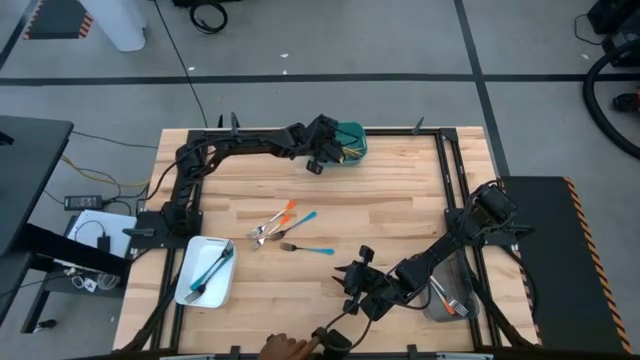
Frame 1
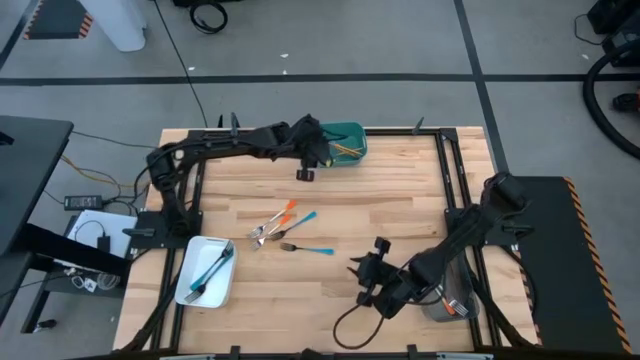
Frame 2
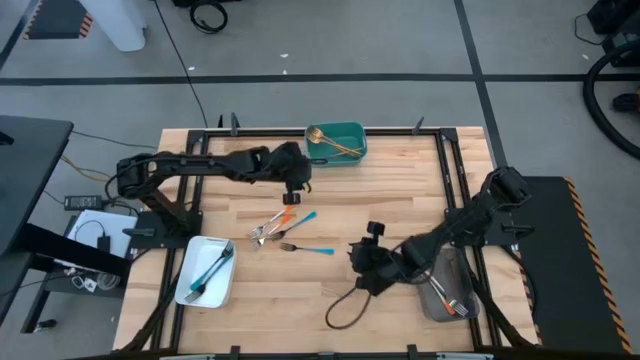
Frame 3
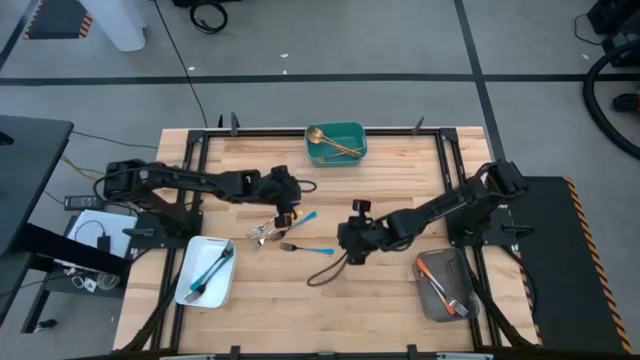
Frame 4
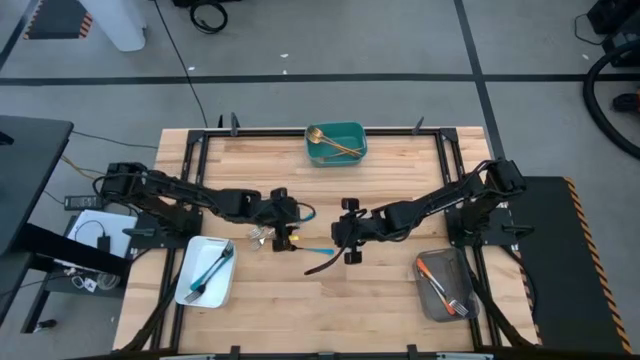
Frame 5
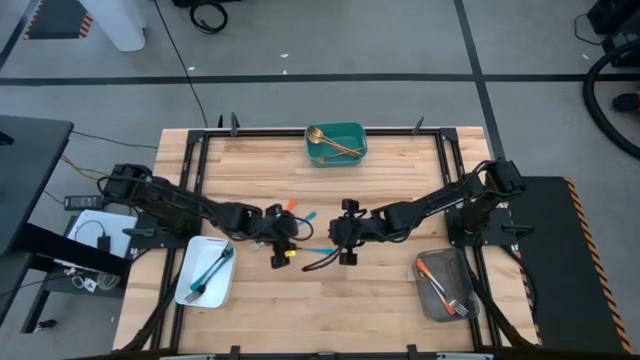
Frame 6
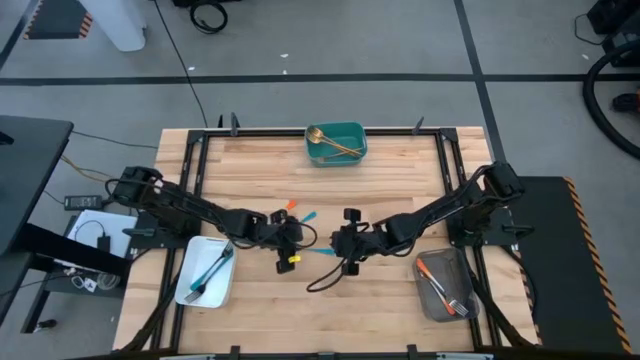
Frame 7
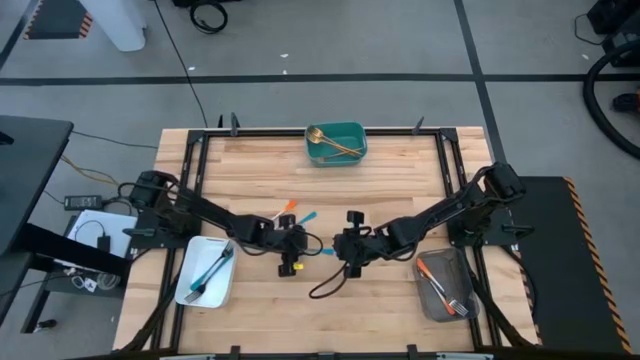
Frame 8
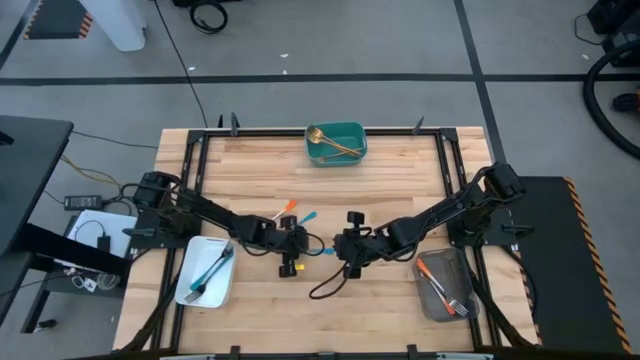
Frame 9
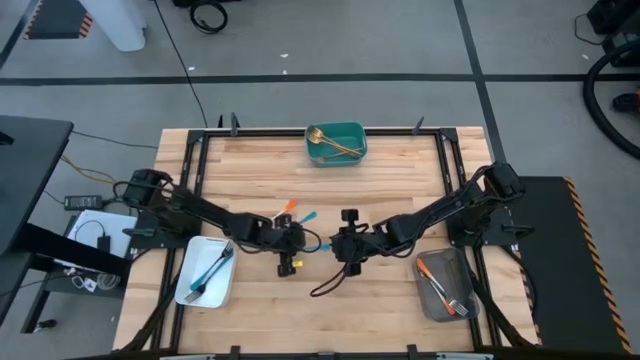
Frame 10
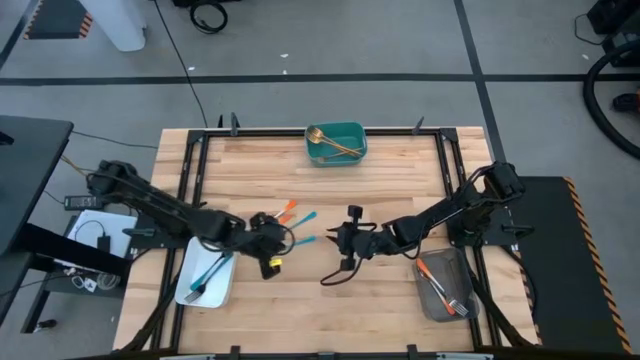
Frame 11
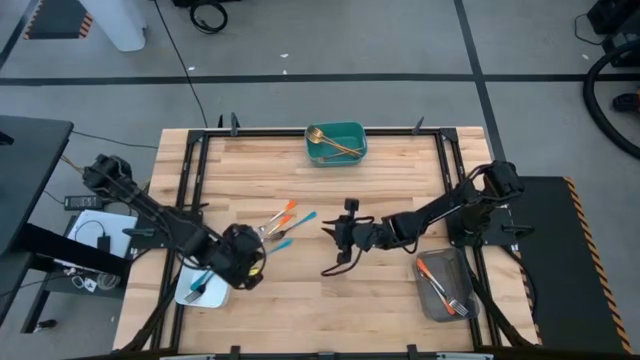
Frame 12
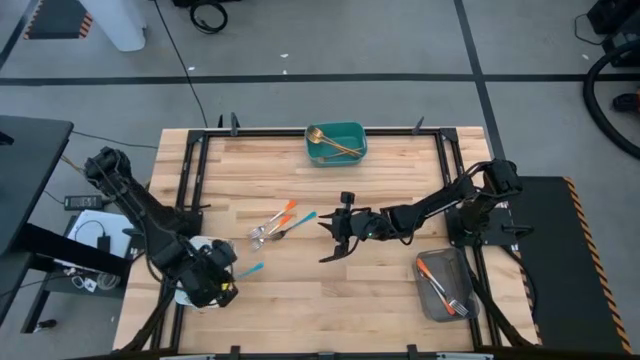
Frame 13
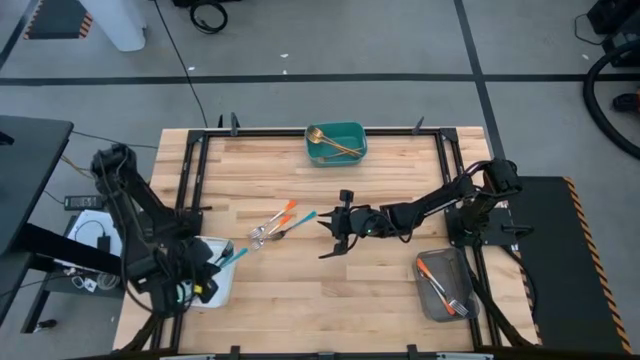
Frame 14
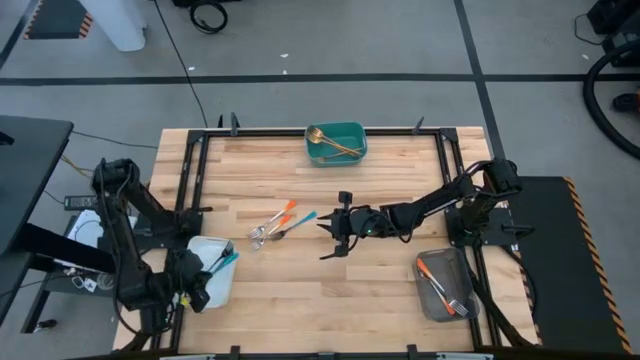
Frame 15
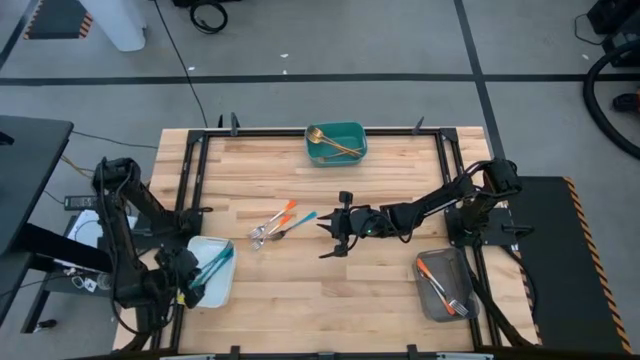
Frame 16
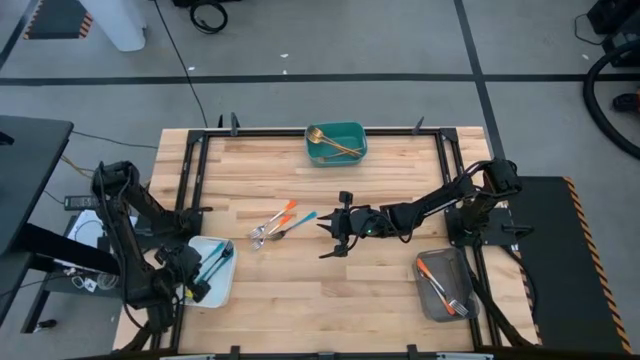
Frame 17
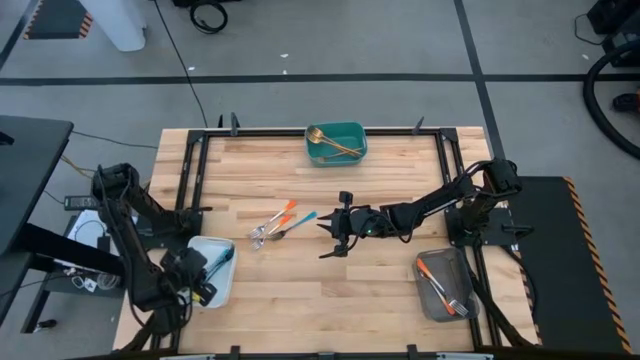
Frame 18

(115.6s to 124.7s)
Task: Sort silverware by color (type)
Put the blue fork into the white bin

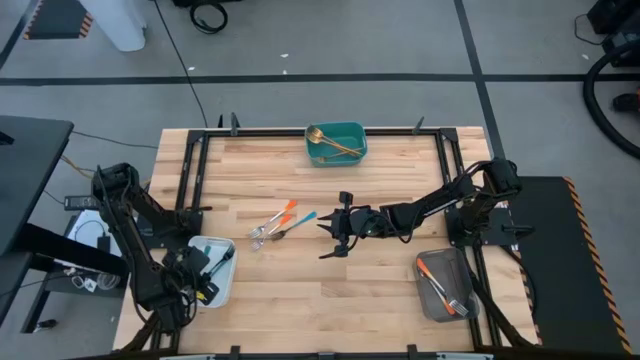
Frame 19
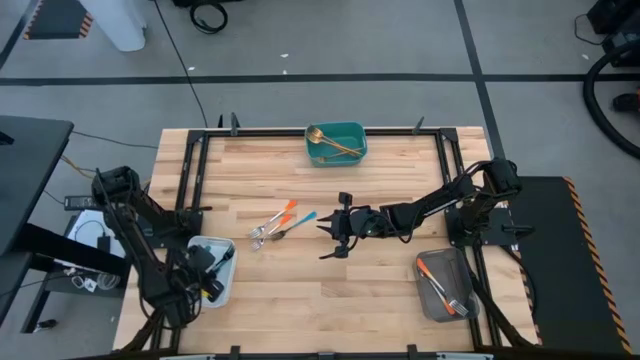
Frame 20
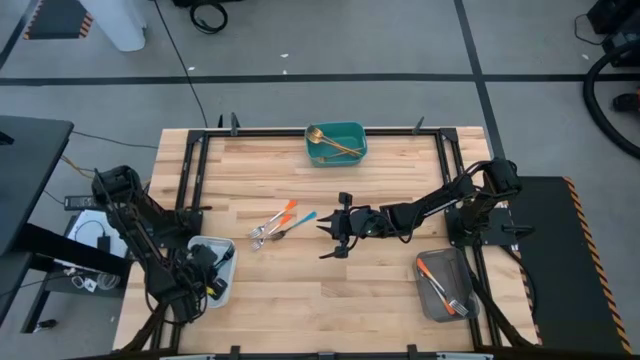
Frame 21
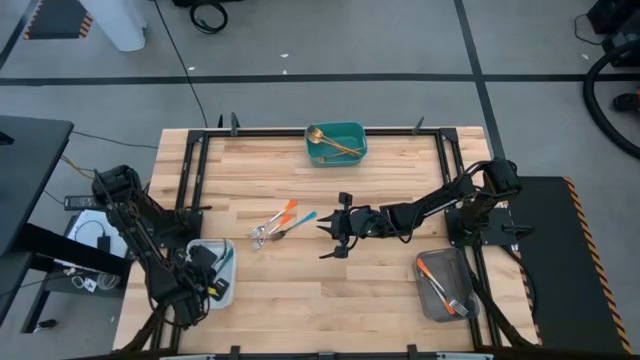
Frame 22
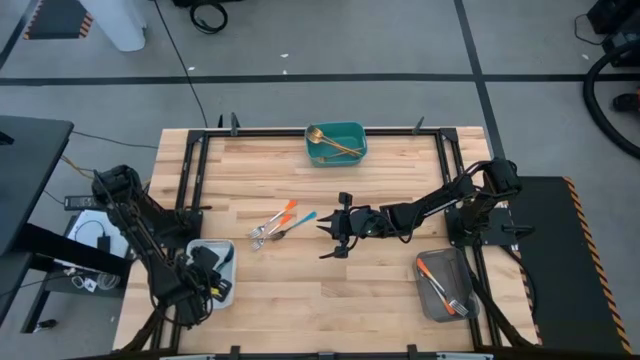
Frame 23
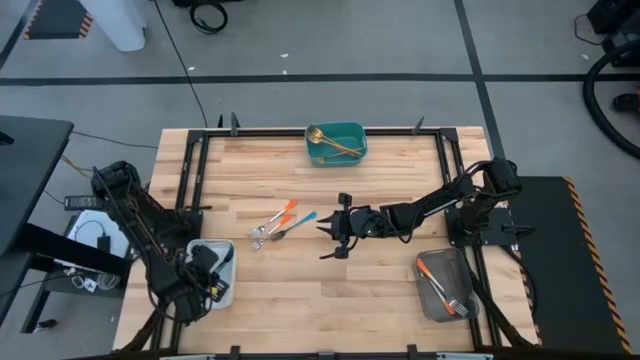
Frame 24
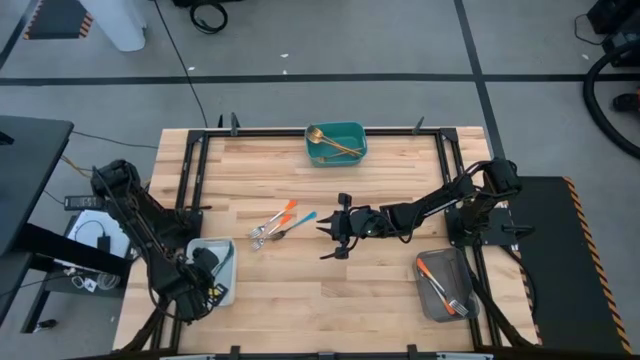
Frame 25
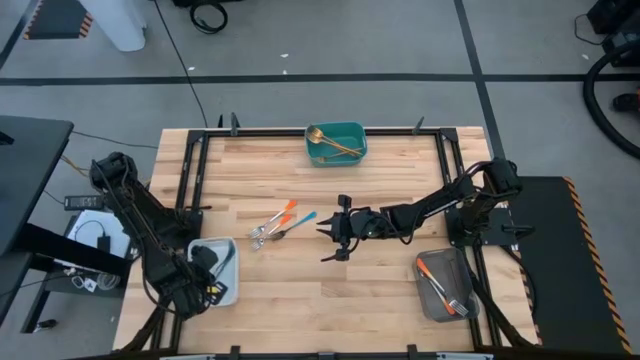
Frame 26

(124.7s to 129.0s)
Put the blue fork into the white bin

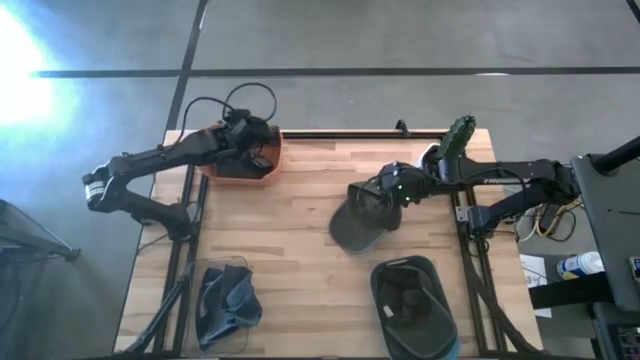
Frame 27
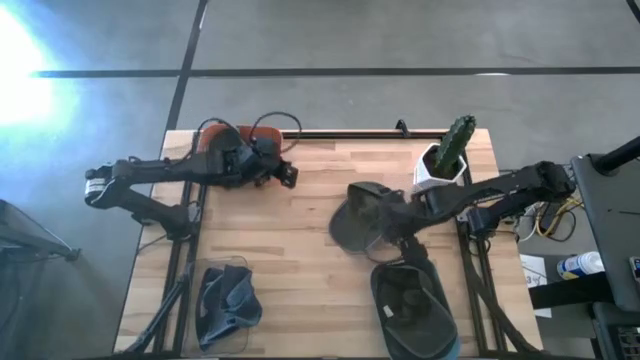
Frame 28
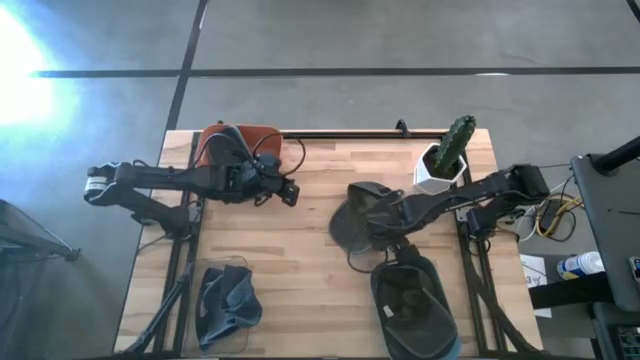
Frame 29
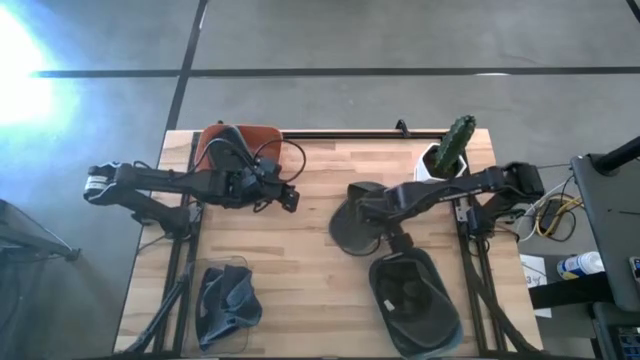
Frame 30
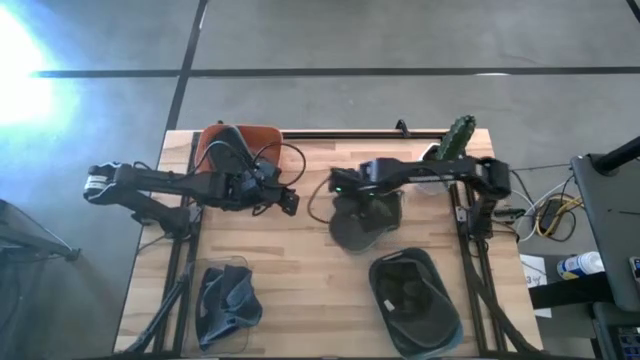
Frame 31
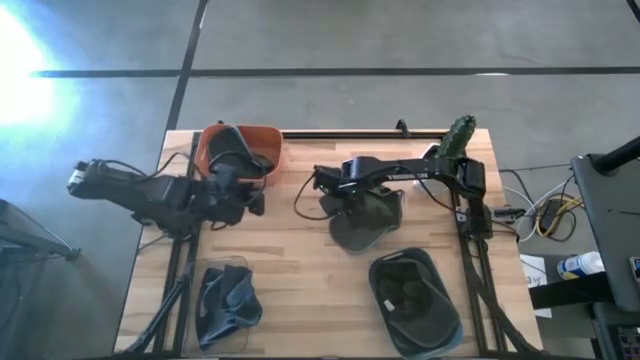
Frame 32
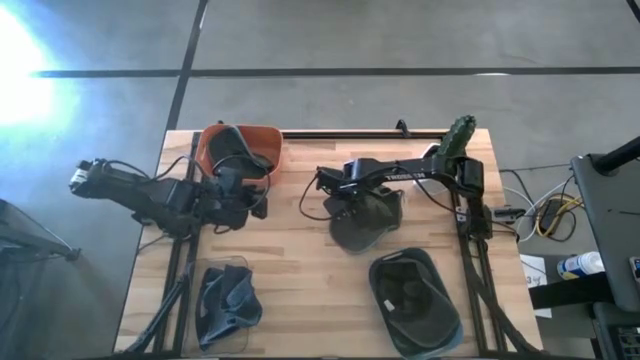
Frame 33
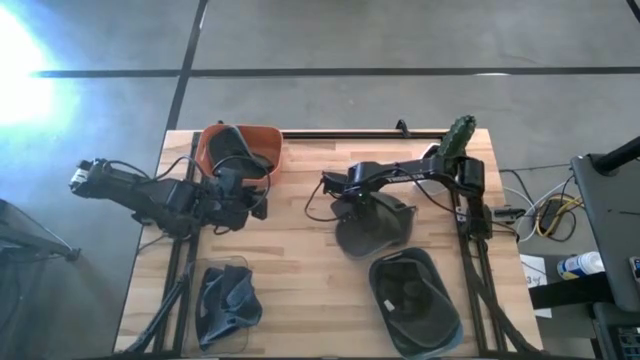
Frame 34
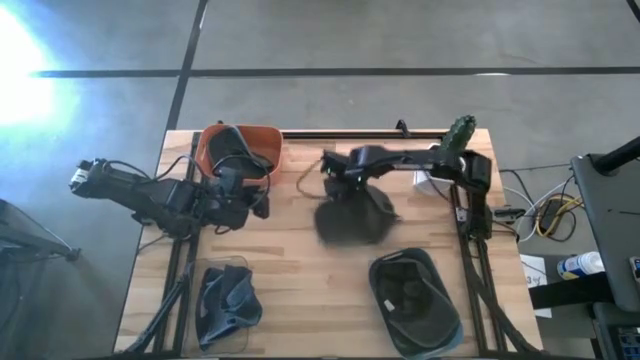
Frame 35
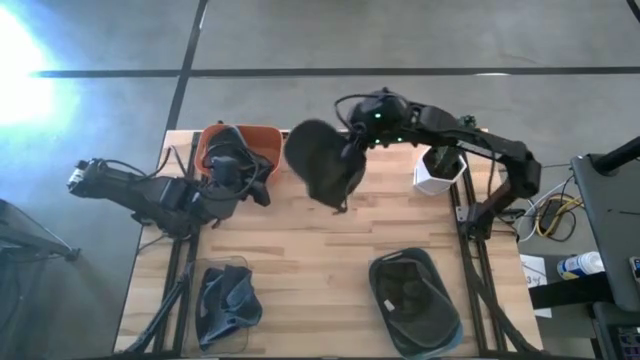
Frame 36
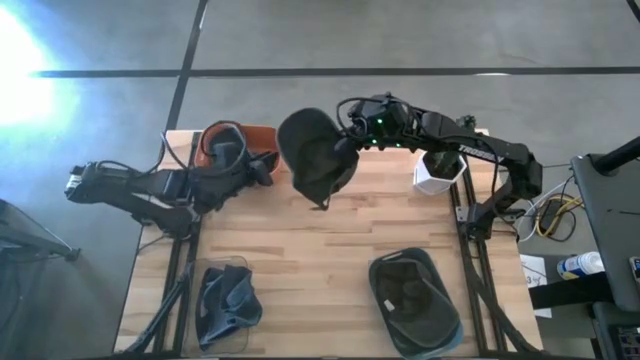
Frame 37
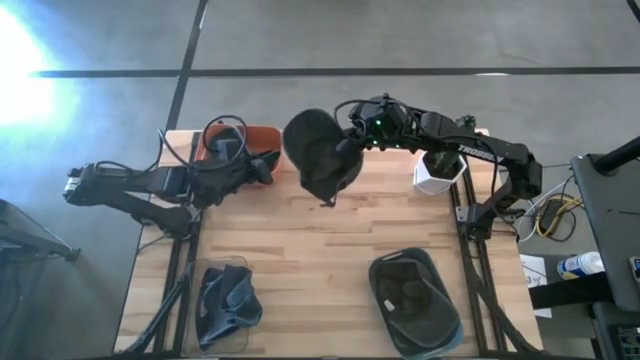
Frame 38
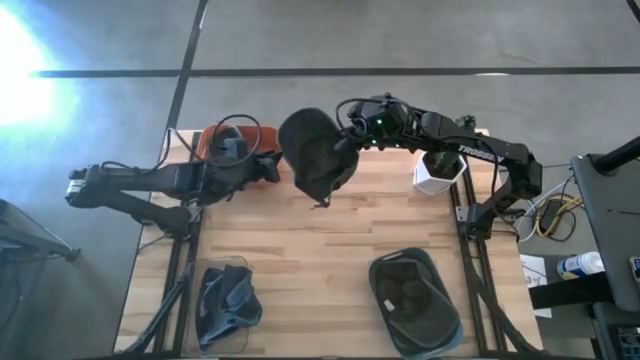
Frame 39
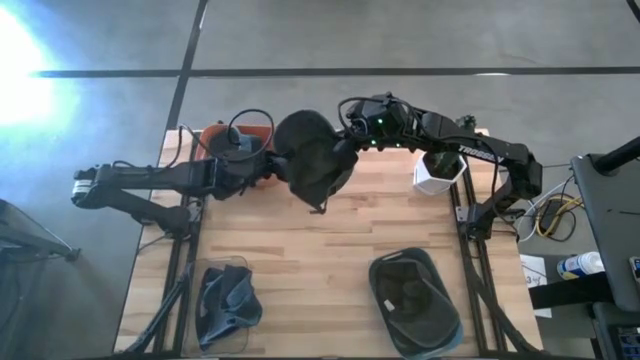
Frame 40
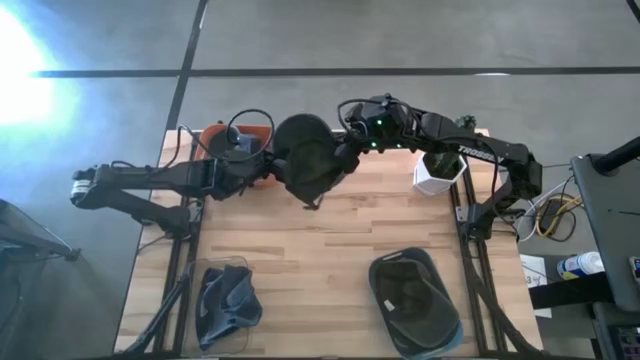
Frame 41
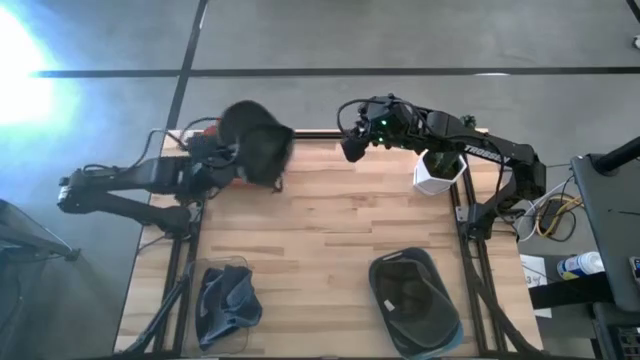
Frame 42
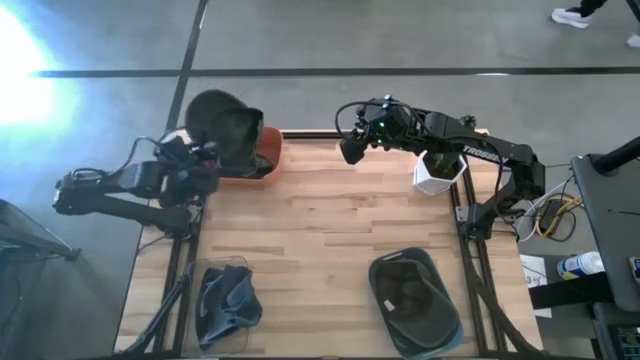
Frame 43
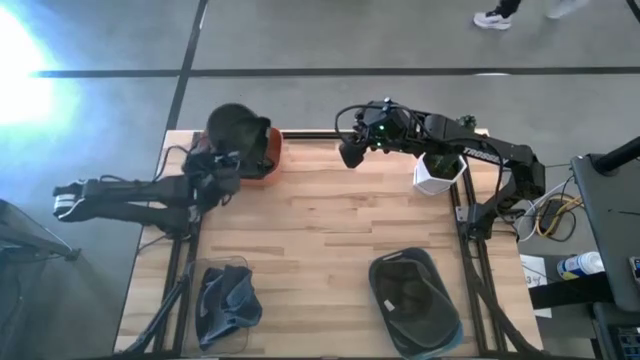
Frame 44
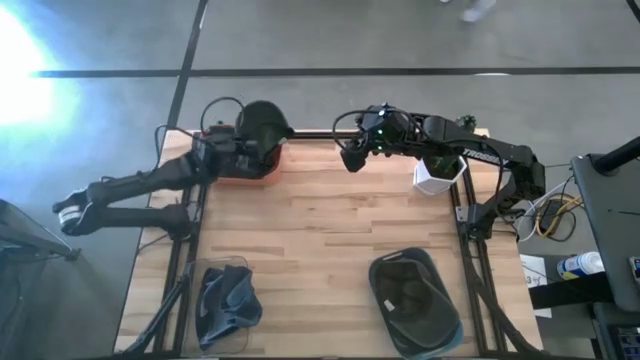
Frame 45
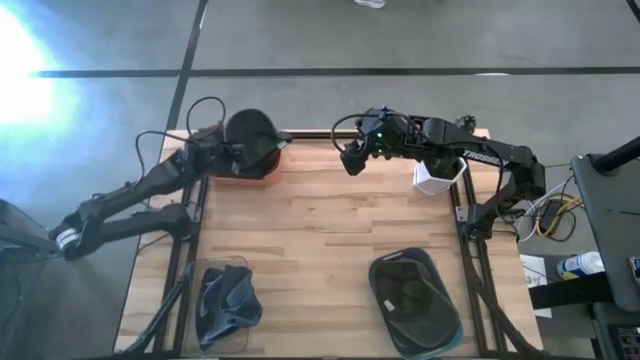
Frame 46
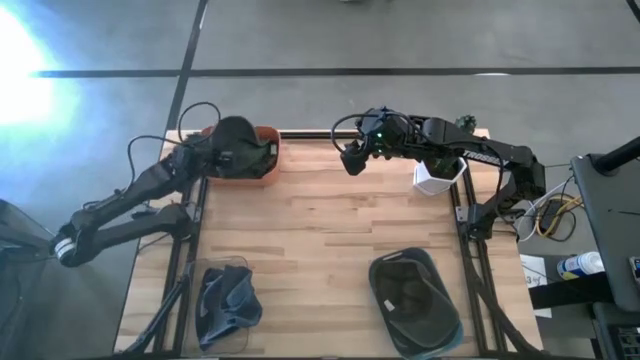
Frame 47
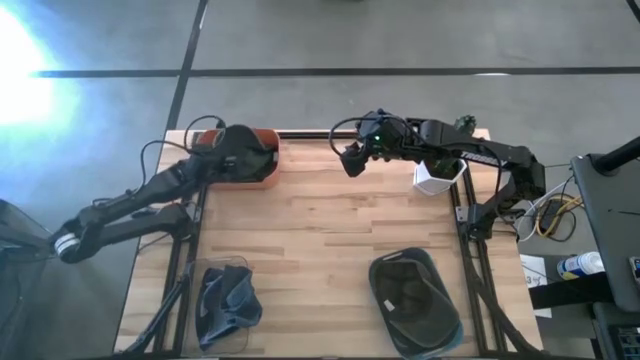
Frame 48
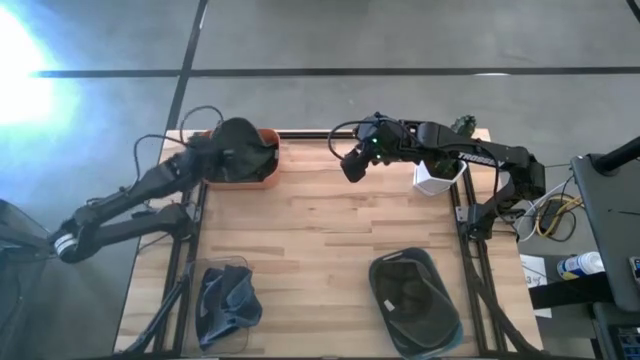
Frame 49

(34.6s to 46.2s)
Task: Pick & Place hat
Put the green cap into the orange bin
